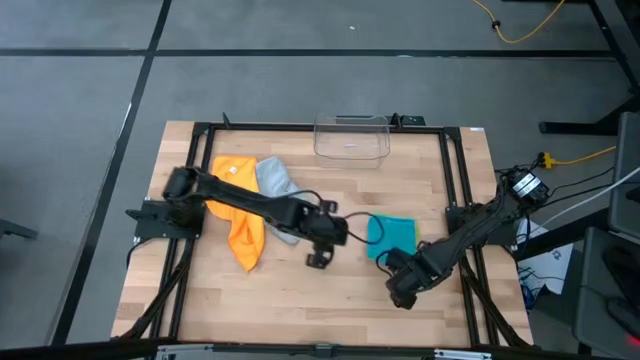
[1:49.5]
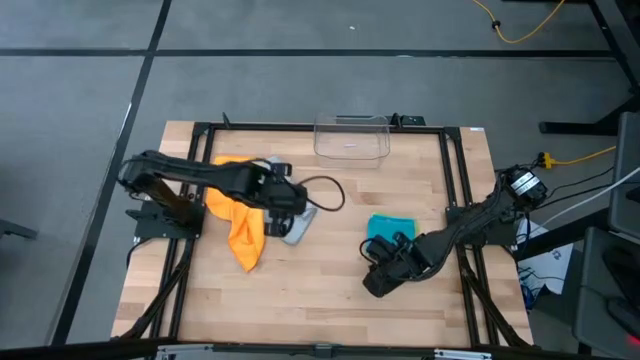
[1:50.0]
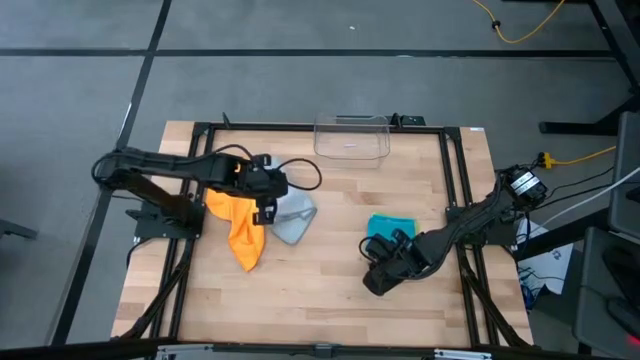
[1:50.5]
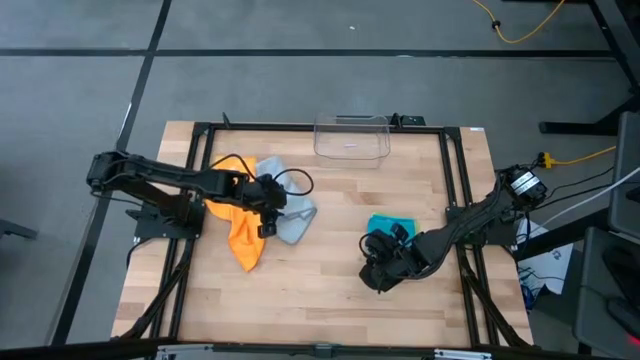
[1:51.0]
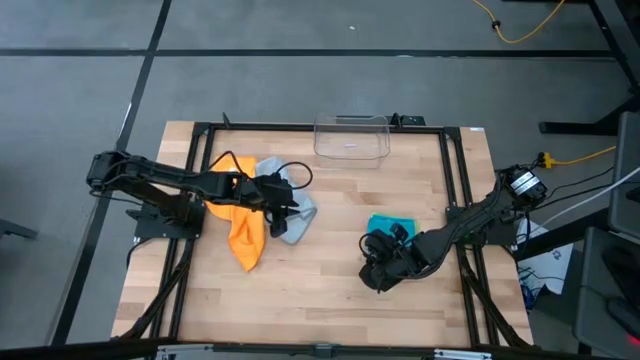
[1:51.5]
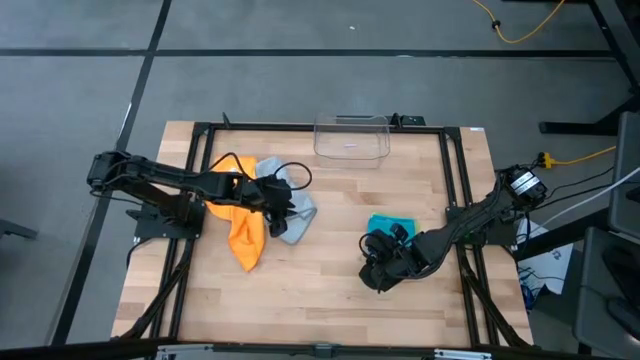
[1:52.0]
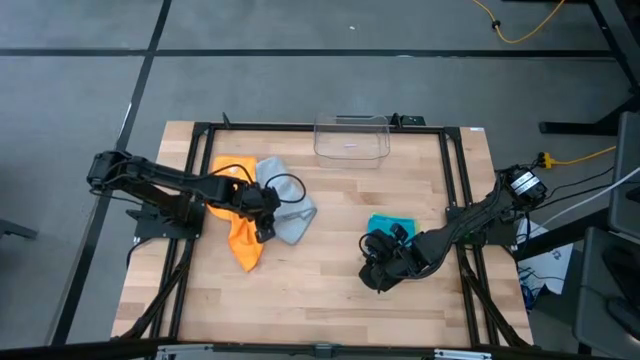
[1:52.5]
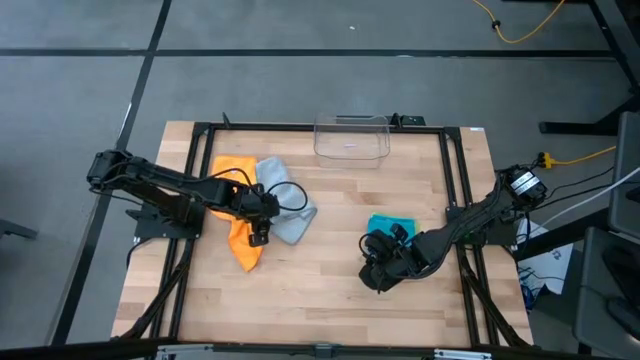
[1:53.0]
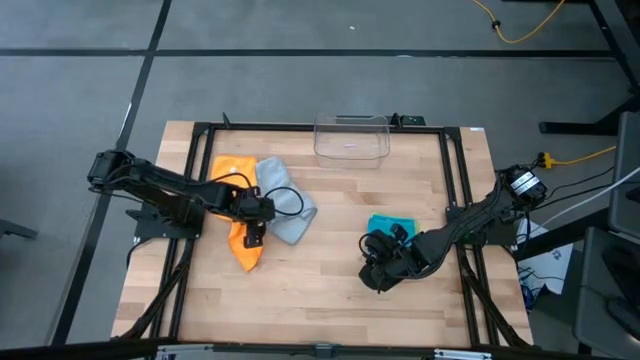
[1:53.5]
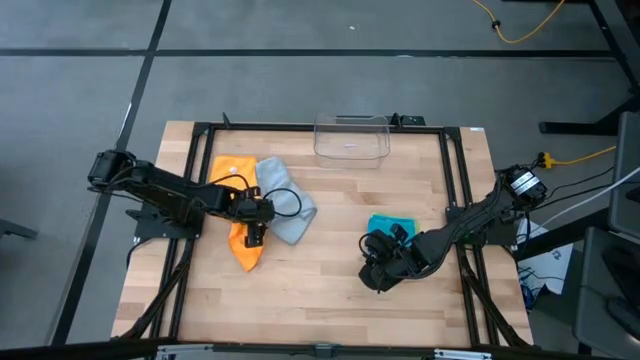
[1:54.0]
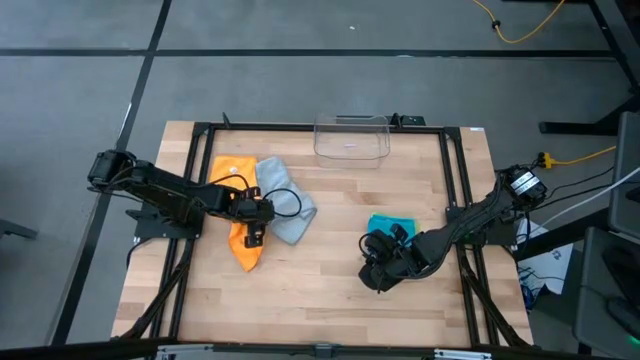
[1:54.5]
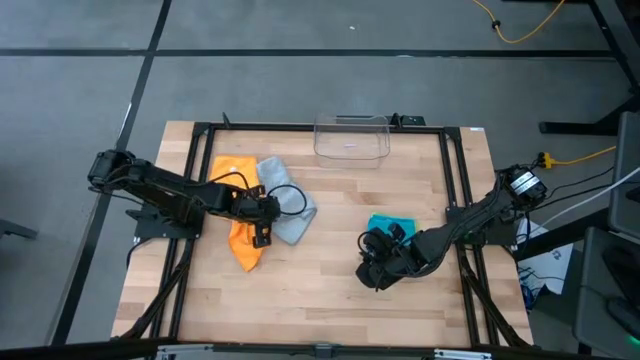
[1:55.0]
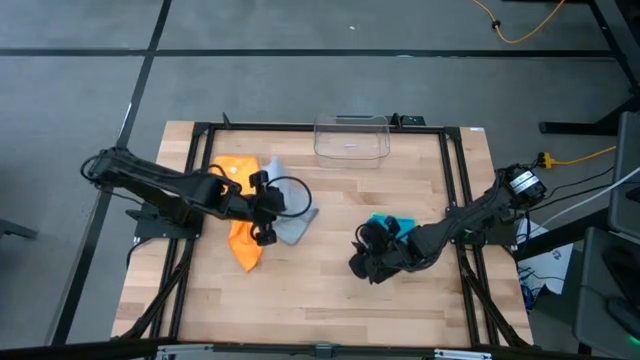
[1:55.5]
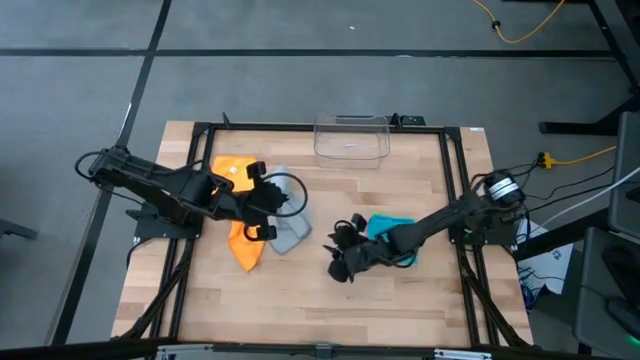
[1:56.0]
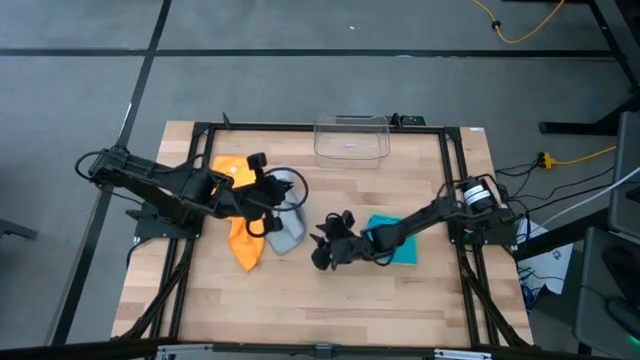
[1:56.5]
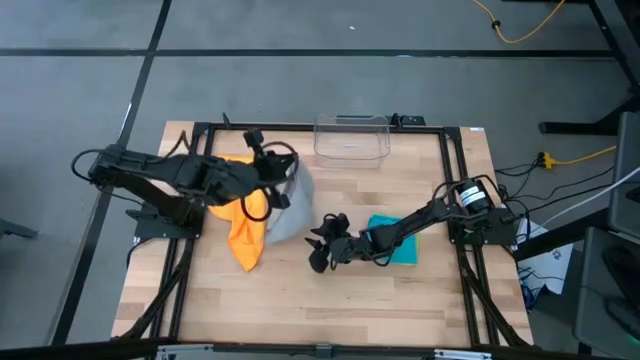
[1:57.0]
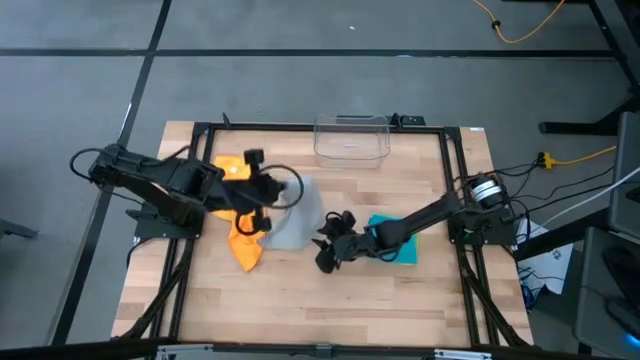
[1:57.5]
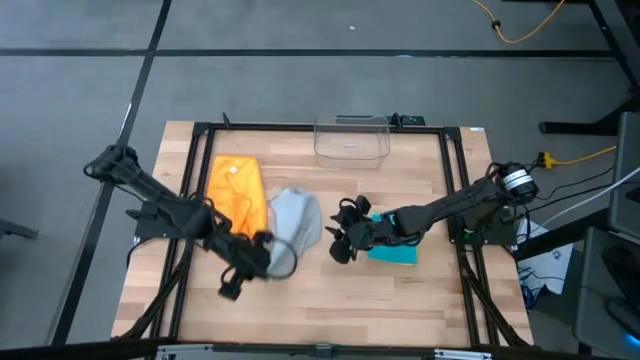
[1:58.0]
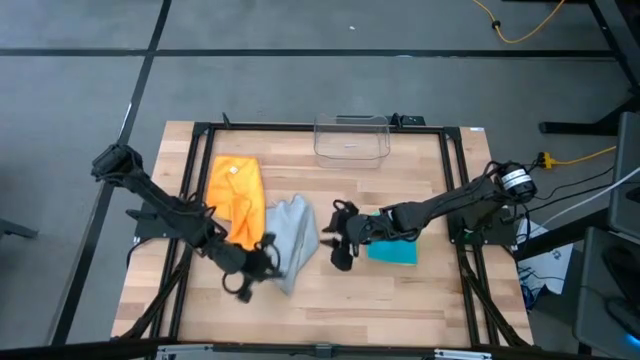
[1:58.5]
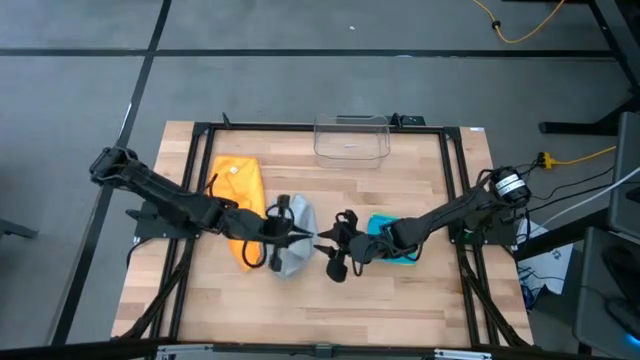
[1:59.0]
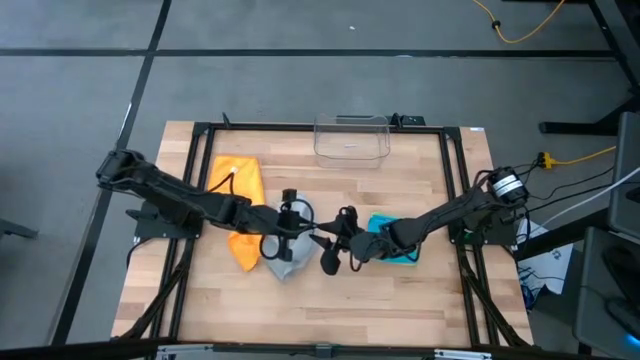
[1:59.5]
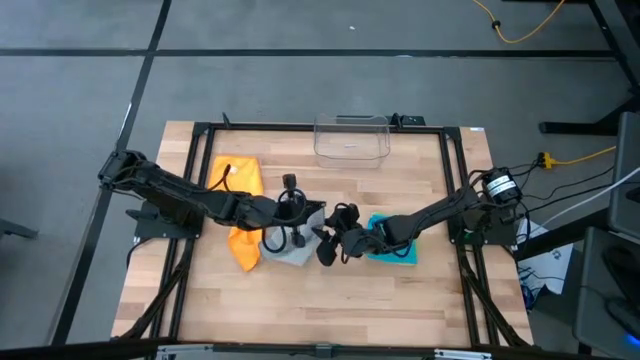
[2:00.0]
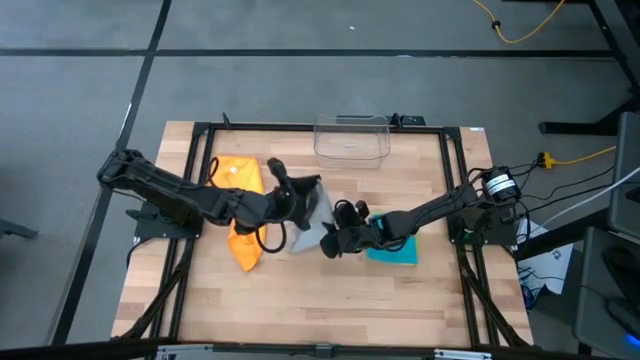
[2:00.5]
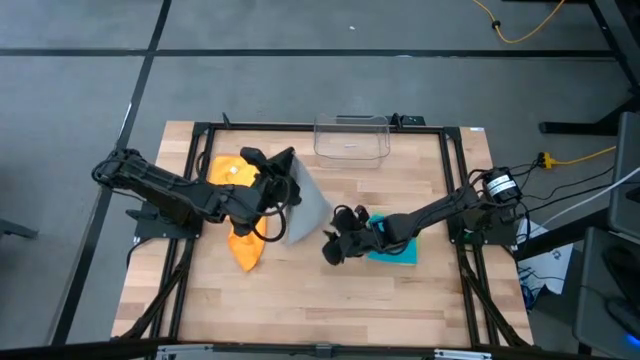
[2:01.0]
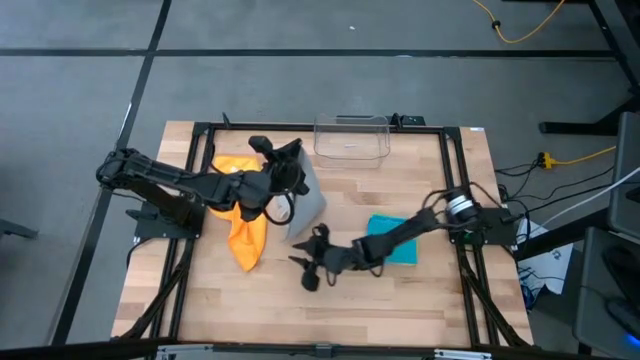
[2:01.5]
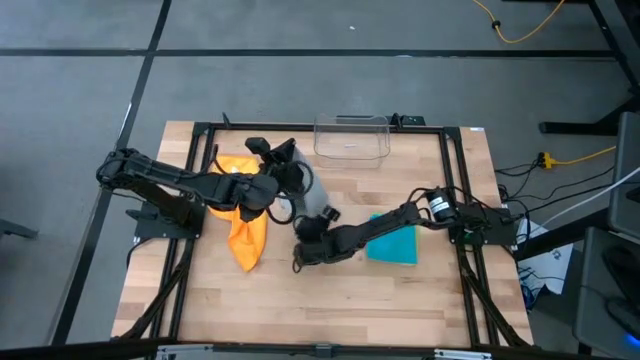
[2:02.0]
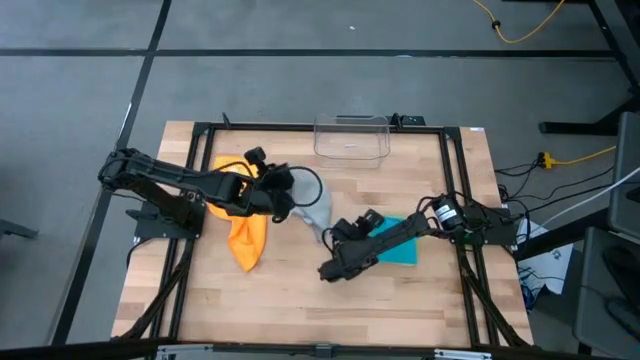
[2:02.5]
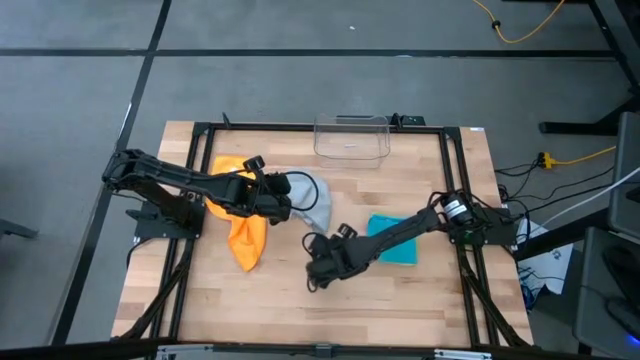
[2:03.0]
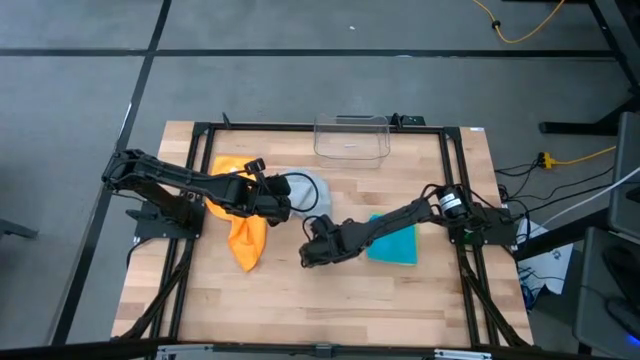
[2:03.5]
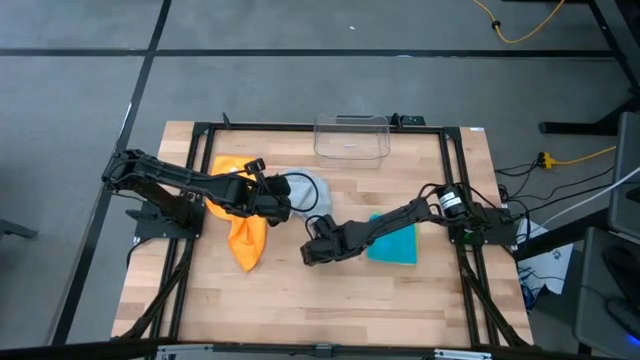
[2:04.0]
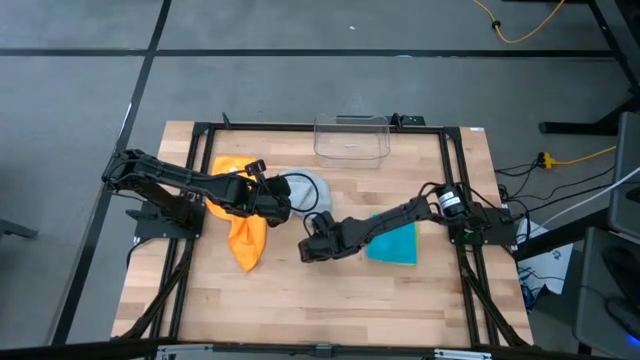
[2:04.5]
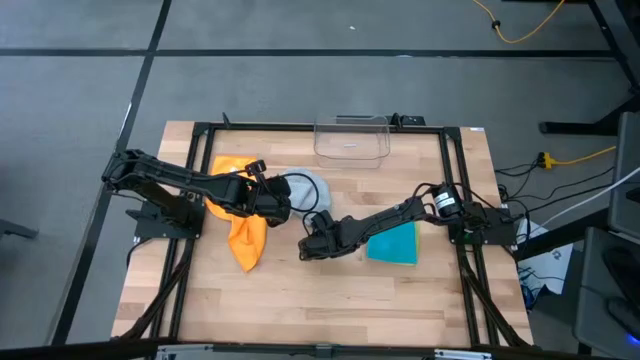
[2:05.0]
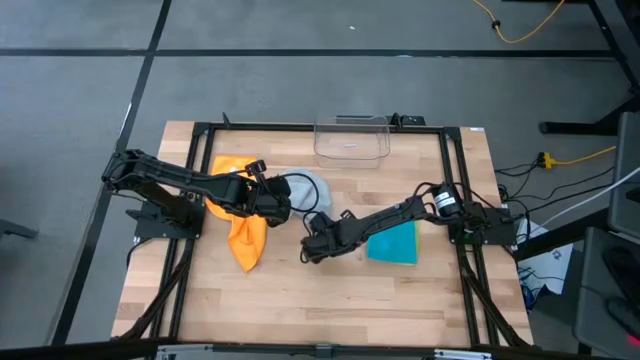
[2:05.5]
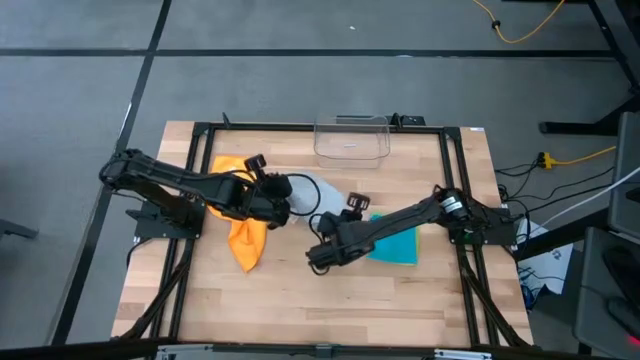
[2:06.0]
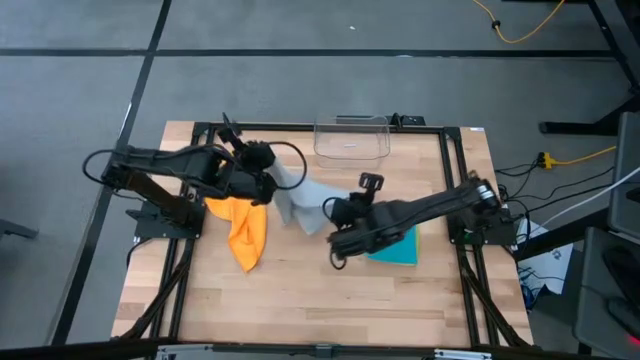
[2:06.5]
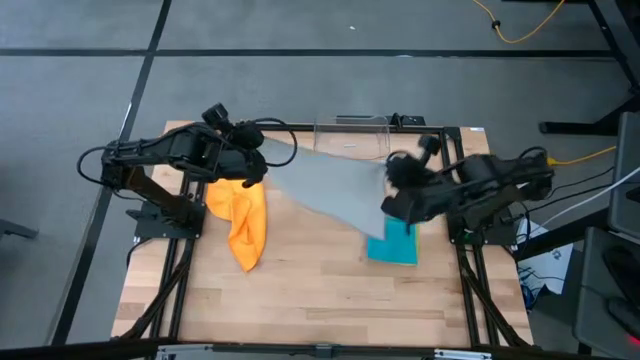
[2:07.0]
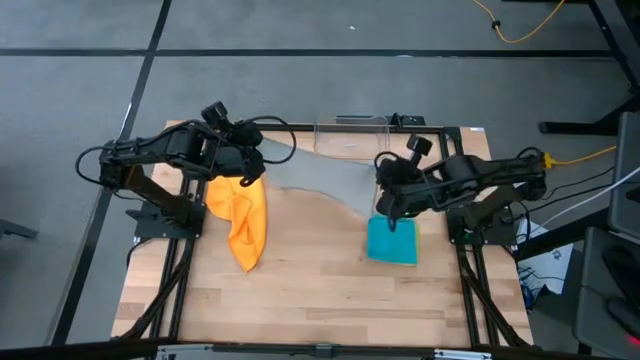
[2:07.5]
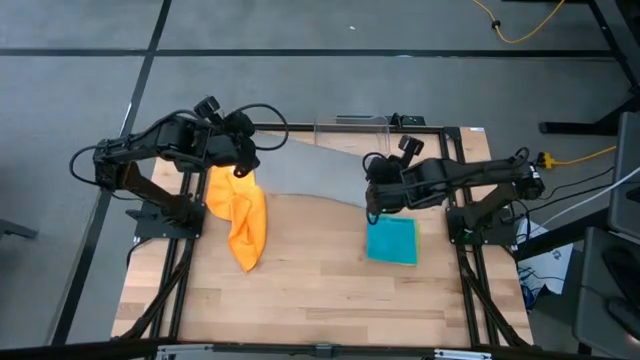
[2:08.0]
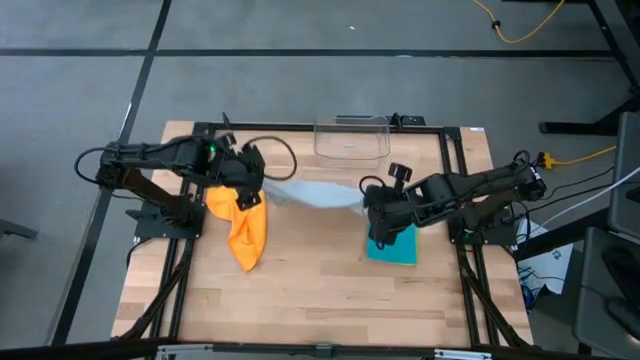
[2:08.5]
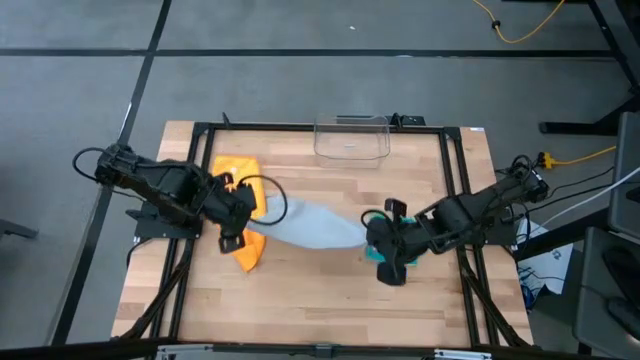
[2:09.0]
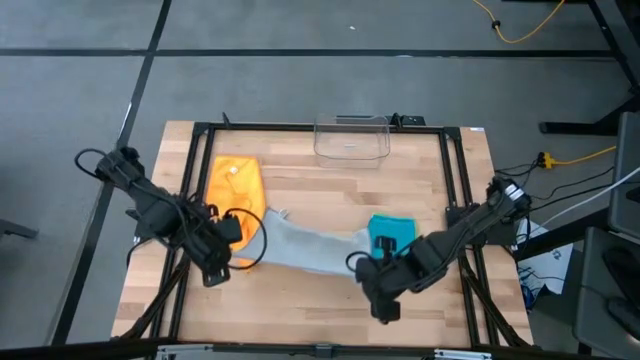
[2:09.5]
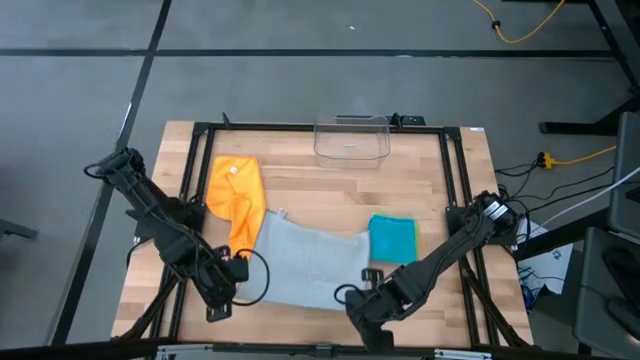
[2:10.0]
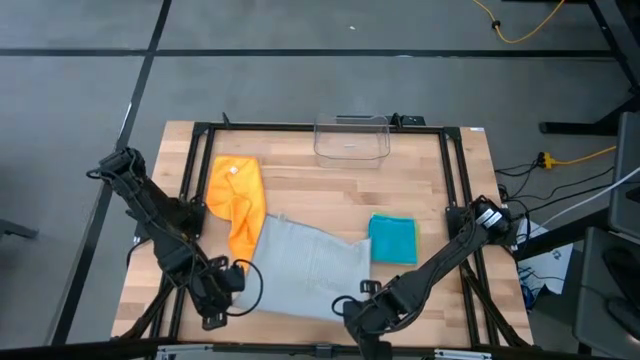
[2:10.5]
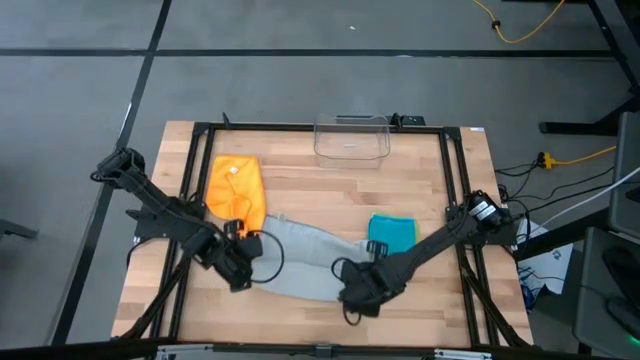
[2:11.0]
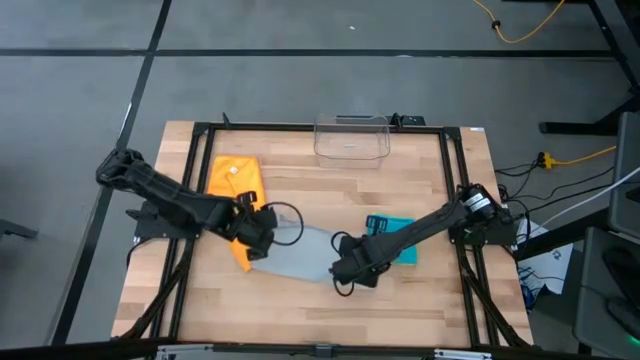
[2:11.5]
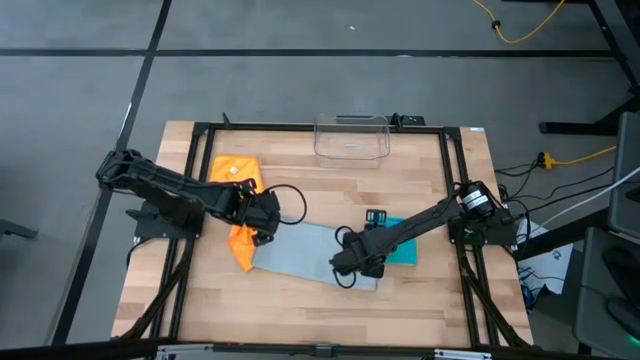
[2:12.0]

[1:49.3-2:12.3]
Task: Fold microfiber towels
Fold the gray microfiber towel
